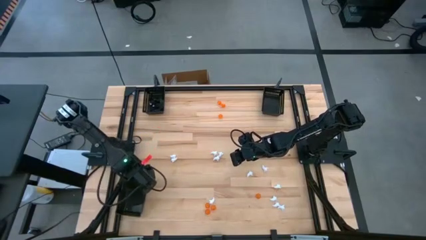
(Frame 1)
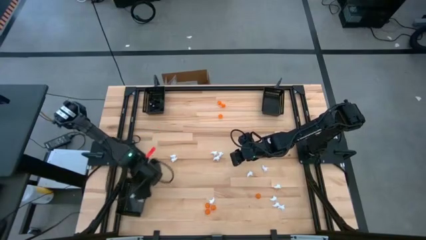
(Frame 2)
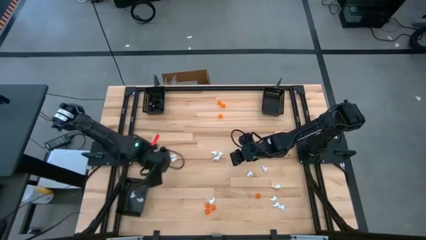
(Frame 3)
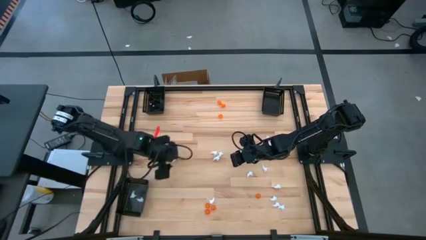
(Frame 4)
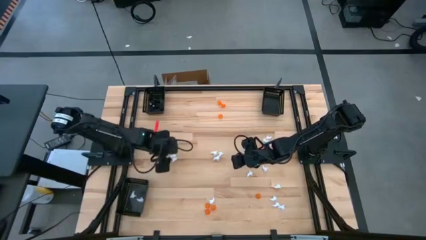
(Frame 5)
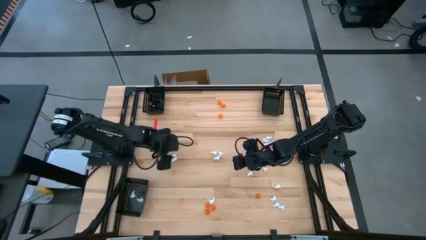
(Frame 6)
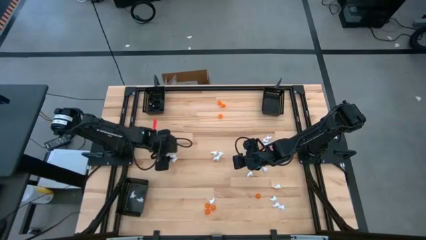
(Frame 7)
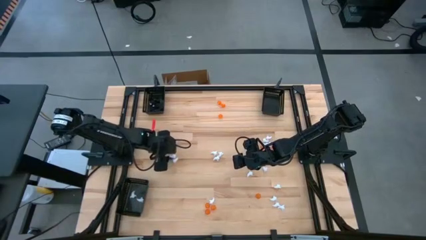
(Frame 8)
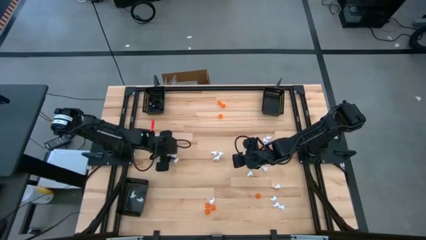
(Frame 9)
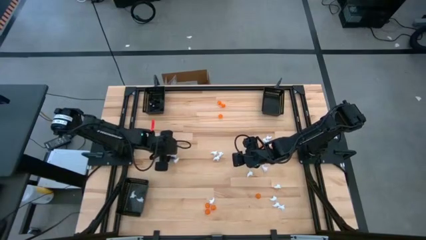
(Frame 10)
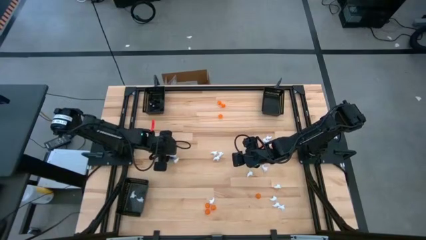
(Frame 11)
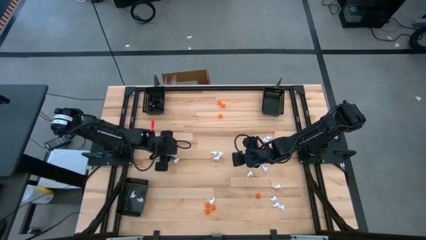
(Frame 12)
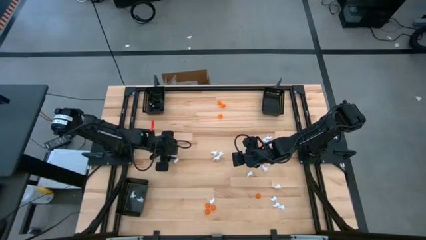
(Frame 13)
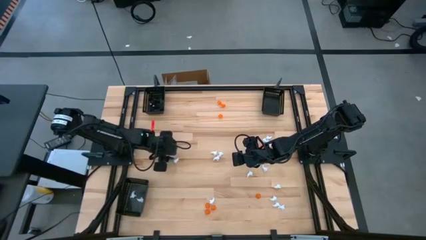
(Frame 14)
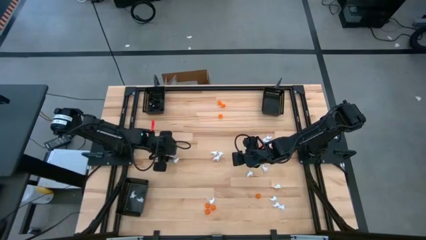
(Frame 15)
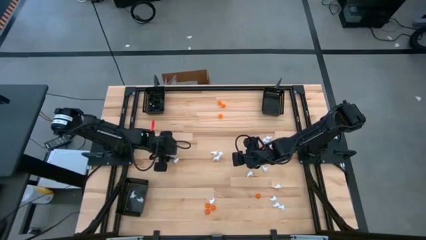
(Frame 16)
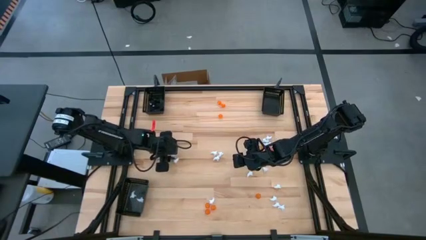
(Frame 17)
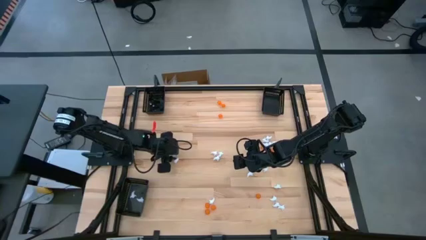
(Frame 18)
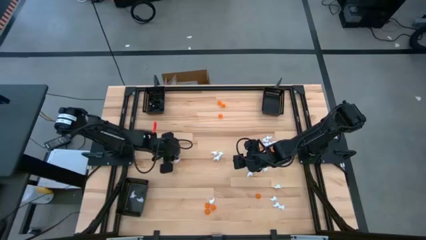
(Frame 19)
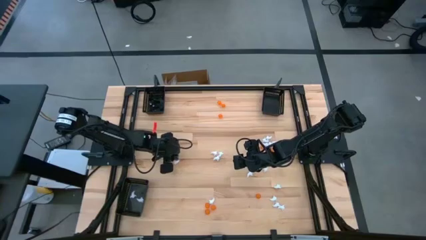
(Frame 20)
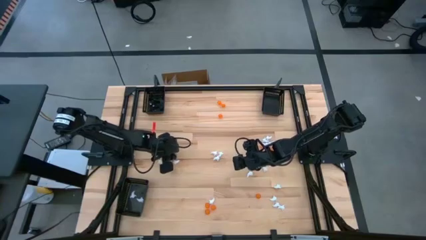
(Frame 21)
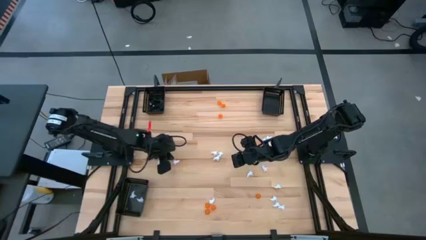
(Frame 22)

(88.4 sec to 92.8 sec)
Task: Sort Halloween decoration
Put the white ghost toy into the bottom black basket

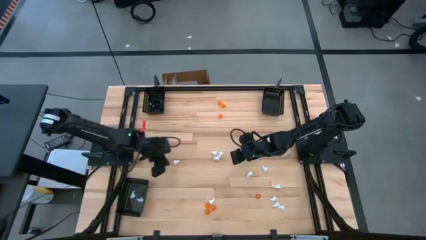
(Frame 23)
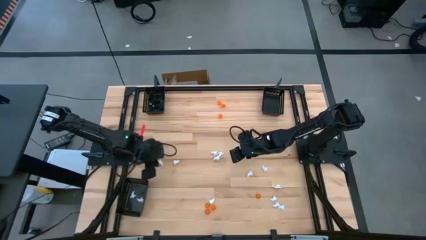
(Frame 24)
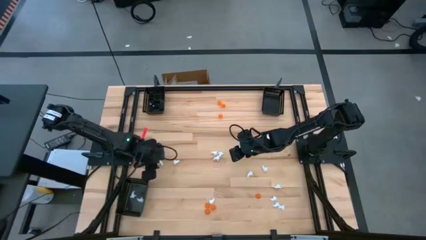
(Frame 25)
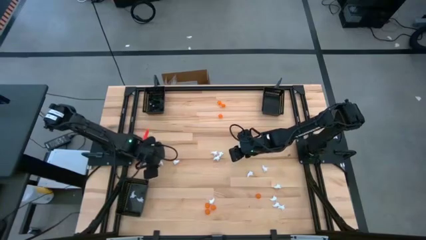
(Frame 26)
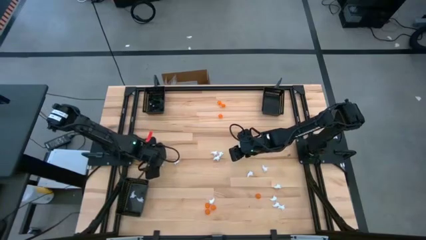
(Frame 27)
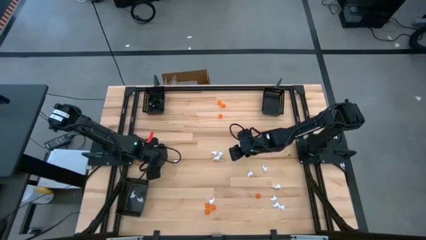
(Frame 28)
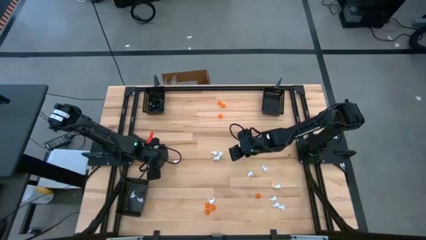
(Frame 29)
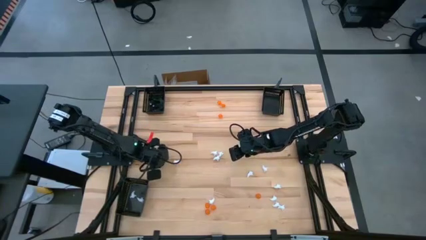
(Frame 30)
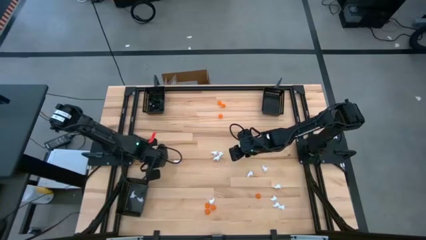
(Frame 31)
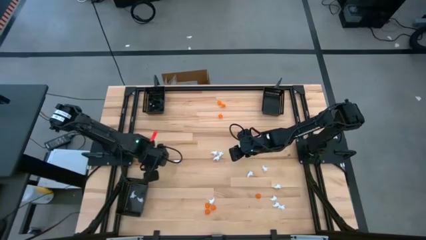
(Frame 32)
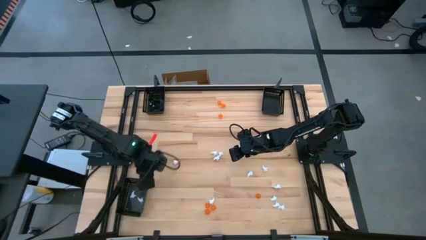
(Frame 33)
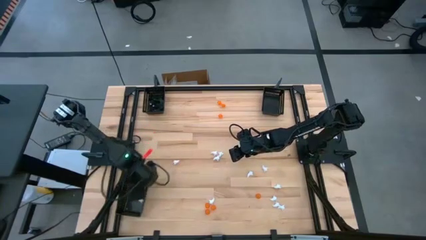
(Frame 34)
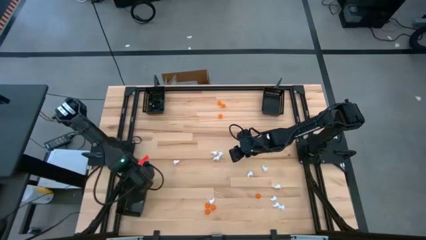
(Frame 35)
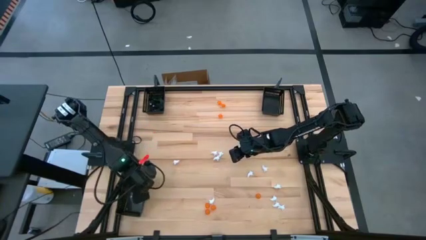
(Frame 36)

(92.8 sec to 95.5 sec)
Put the white ghost toy into the bottom black basket

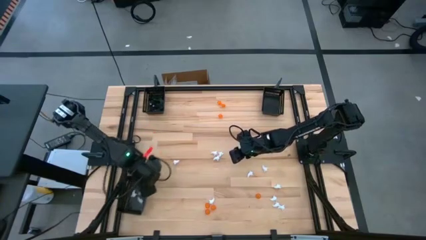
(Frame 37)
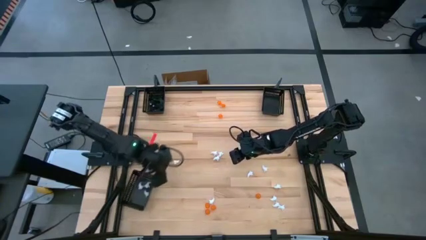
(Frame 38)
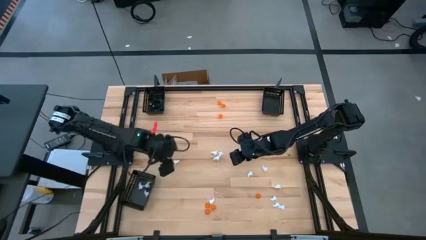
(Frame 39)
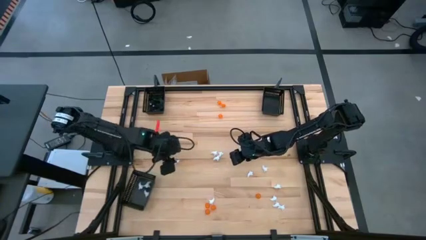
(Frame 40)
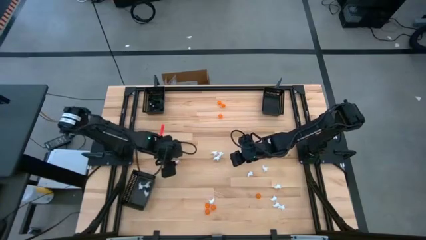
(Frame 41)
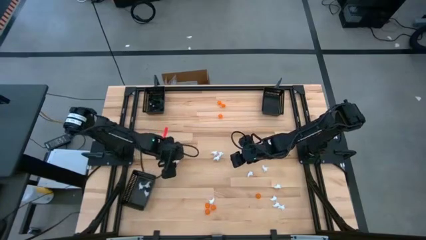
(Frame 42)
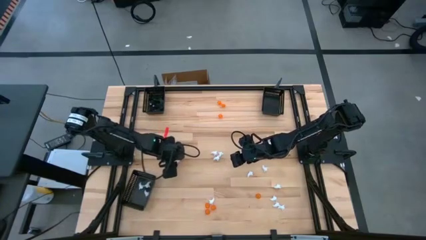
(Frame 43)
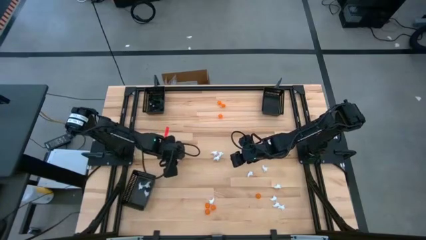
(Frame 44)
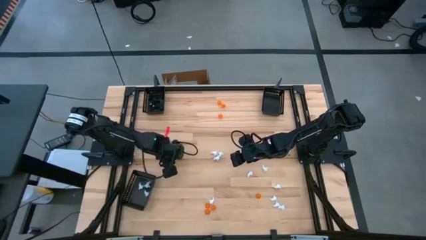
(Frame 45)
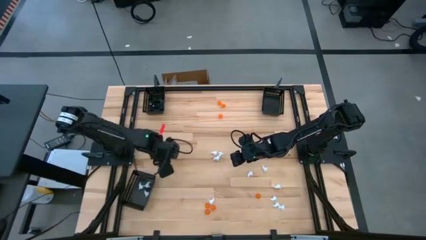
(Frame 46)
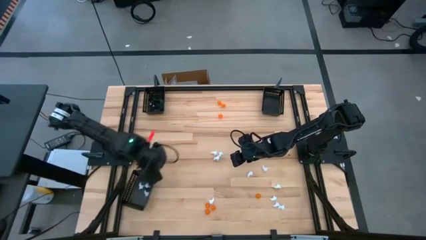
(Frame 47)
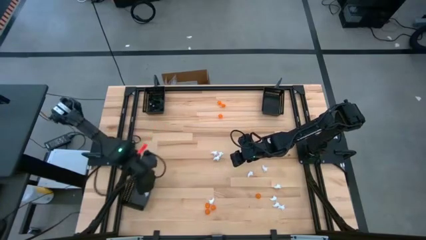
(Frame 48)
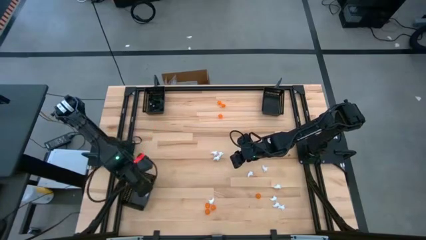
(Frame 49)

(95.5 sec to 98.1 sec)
Put the white ghost toy into the bottom black basket

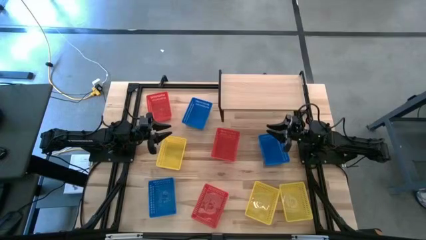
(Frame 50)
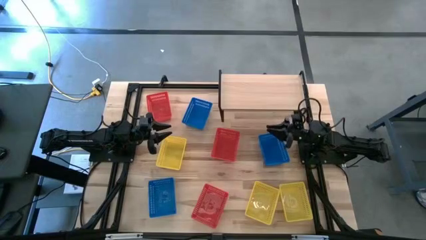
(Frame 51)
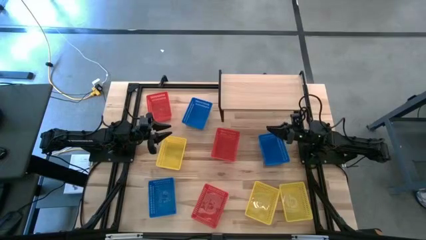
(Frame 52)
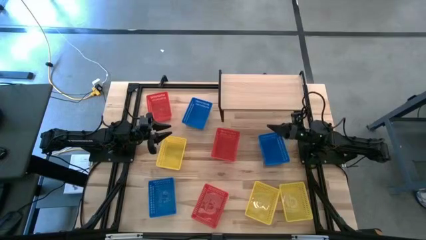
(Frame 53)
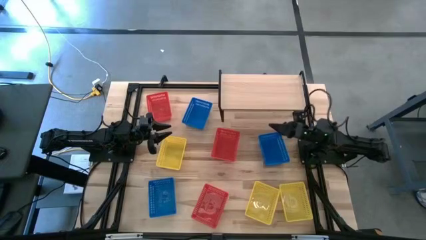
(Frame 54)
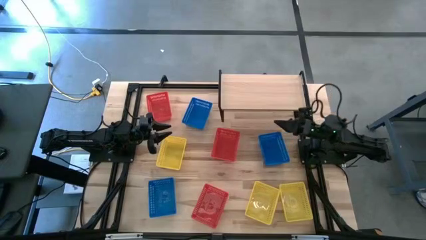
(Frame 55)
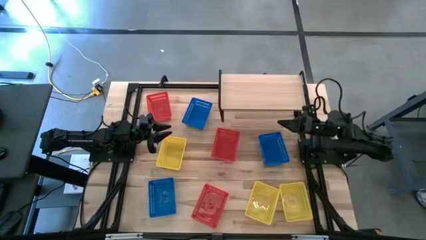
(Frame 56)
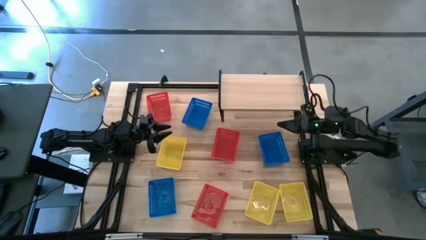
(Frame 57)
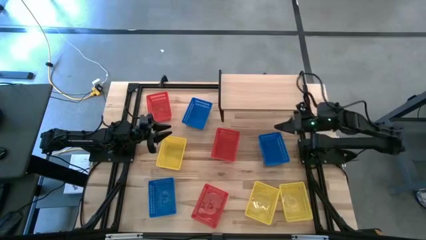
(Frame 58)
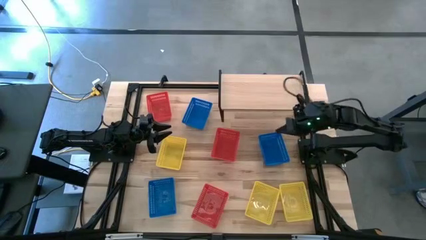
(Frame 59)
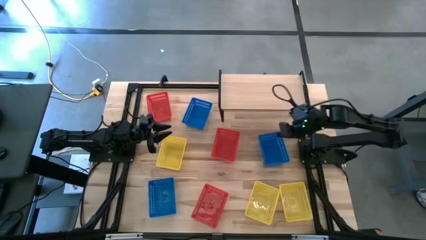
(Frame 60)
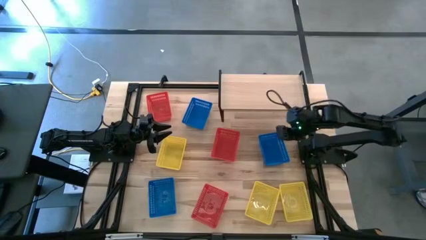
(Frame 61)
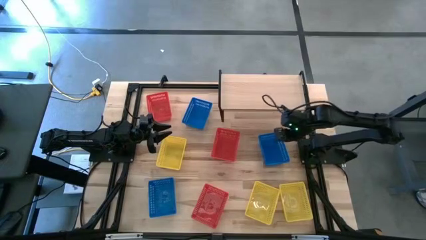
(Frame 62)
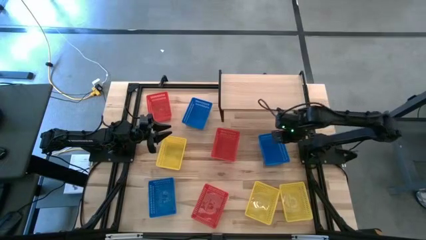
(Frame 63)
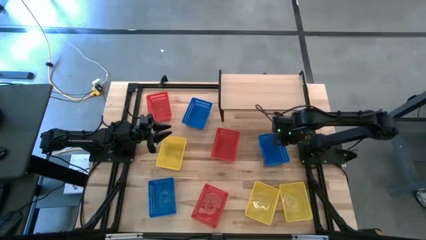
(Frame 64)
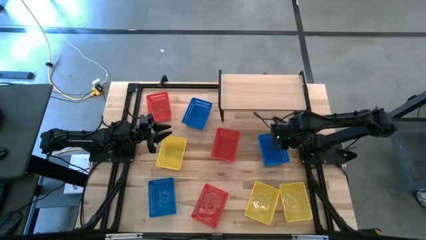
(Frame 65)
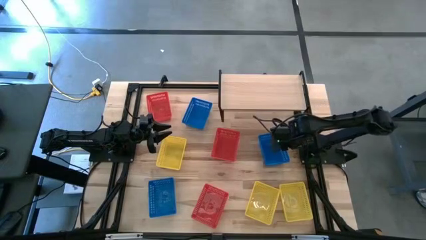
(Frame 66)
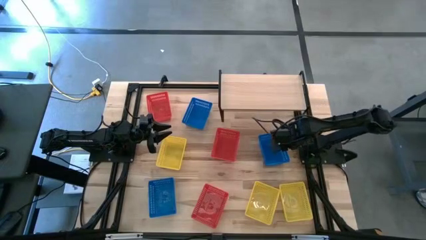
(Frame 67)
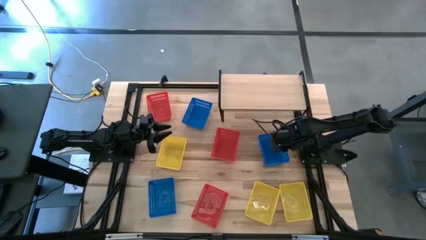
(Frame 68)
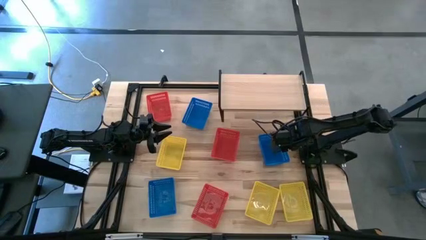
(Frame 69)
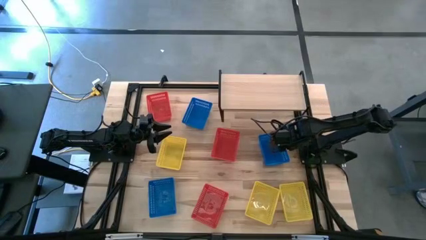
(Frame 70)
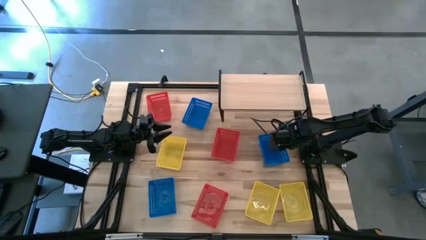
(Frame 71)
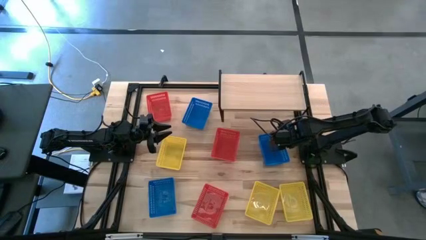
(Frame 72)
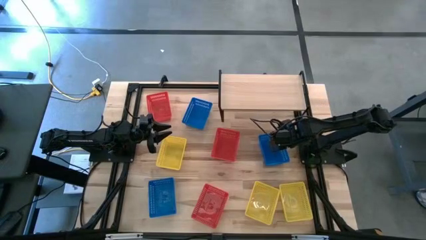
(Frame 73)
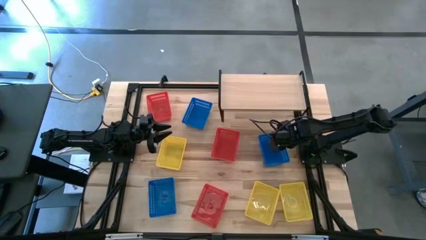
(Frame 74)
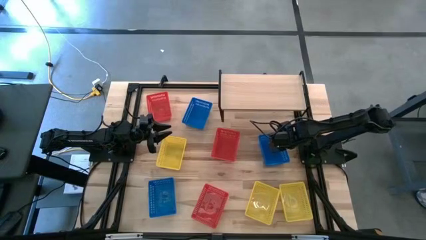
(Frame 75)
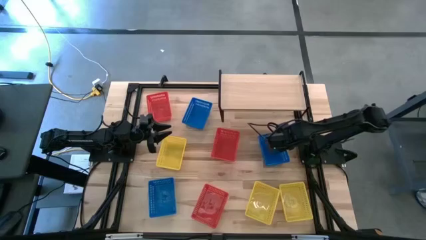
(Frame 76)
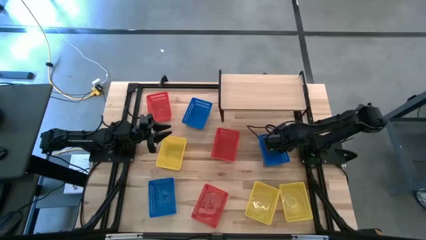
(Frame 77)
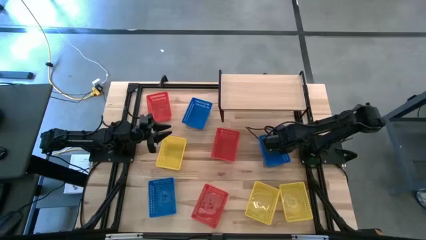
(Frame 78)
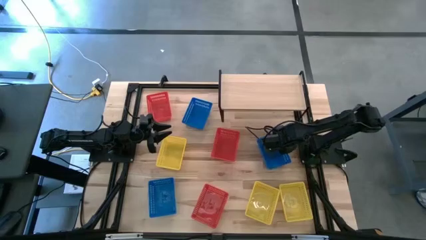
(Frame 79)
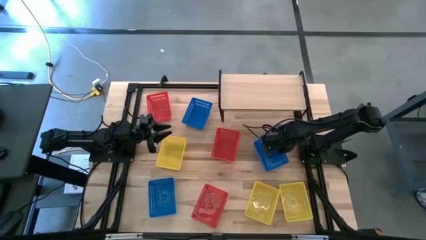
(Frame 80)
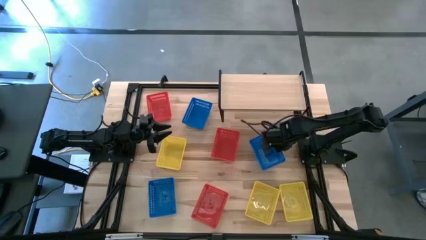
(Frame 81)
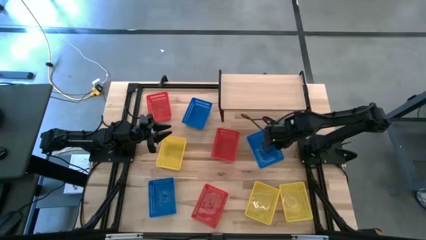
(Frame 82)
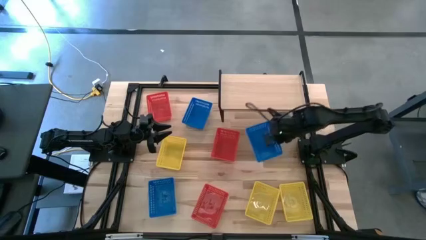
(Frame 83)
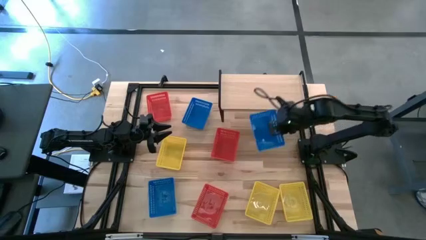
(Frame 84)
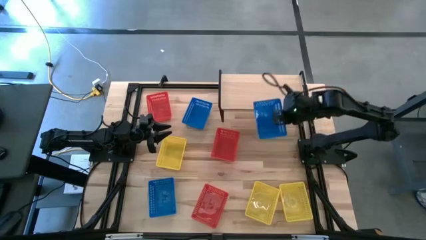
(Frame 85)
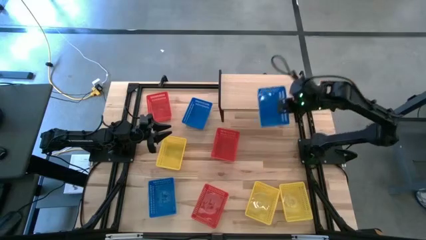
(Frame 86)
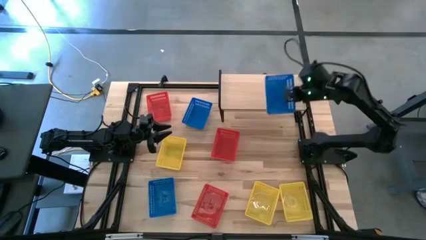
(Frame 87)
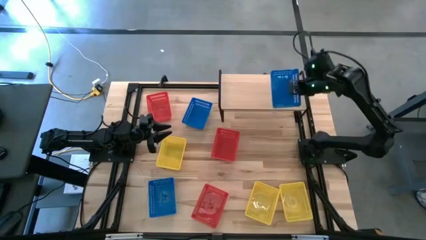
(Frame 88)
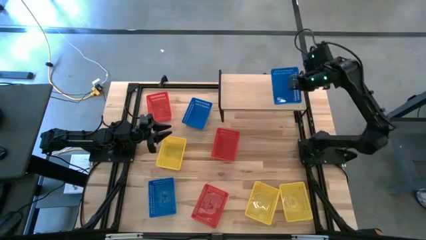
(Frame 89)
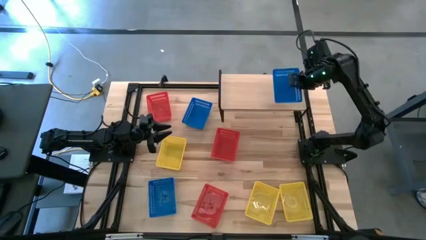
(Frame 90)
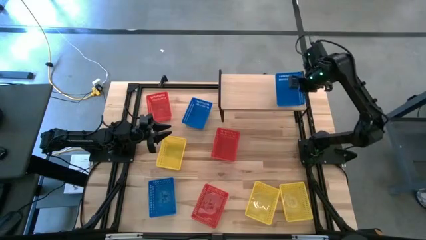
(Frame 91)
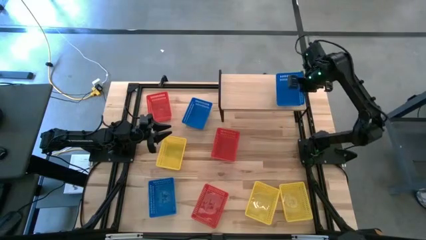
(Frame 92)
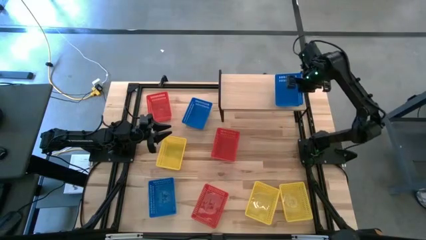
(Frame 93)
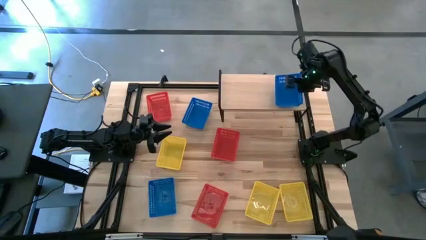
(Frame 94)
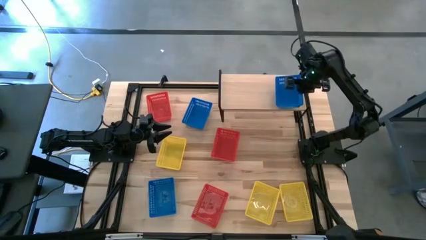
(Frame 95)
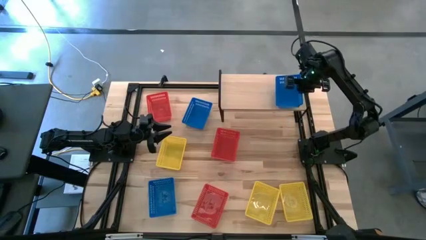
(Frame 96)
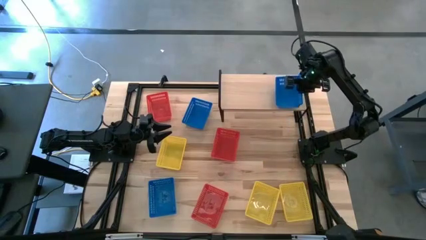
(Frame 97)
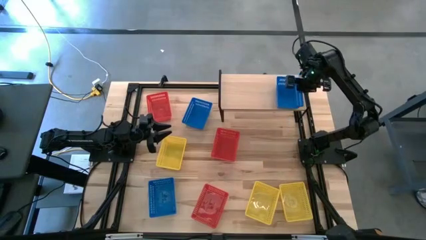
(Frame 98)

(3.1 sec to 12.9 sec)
Task: Stack baskets on shelf by color
Put the middle blue basket on the shelf
